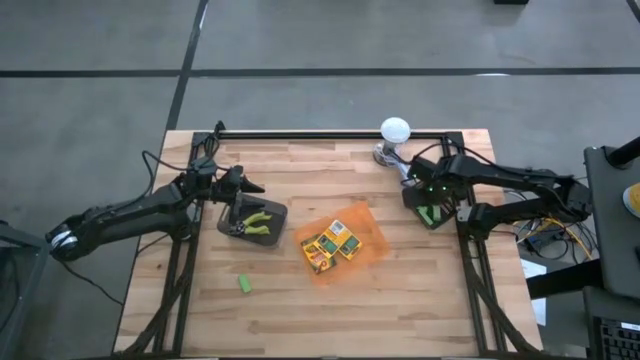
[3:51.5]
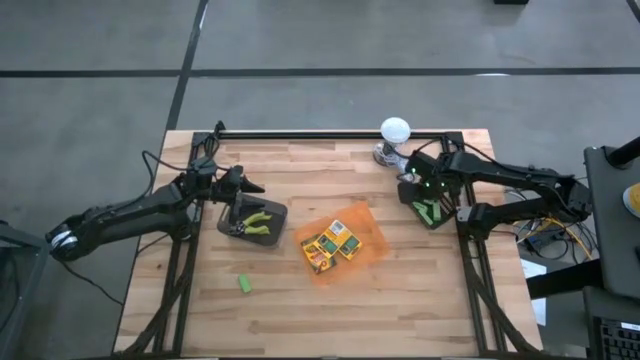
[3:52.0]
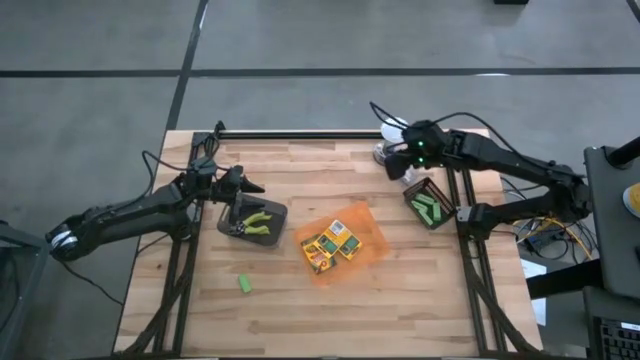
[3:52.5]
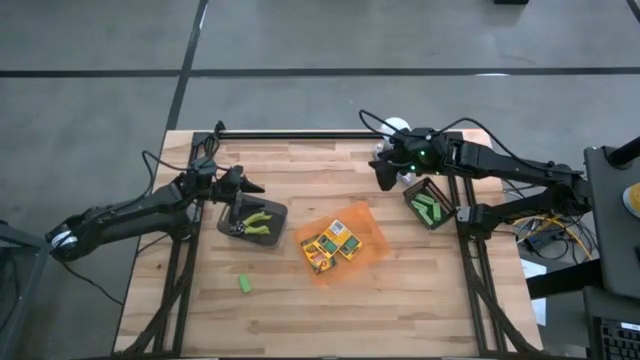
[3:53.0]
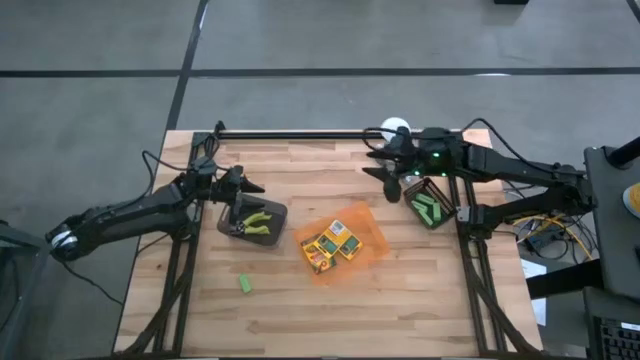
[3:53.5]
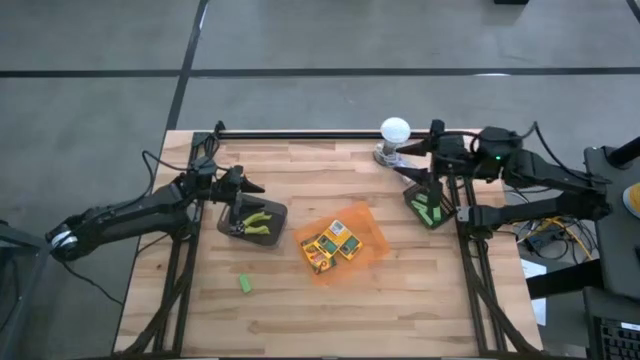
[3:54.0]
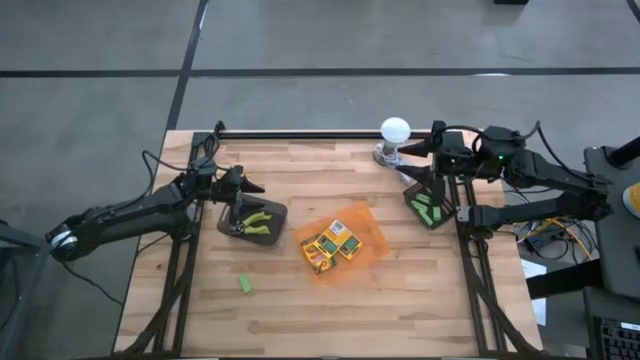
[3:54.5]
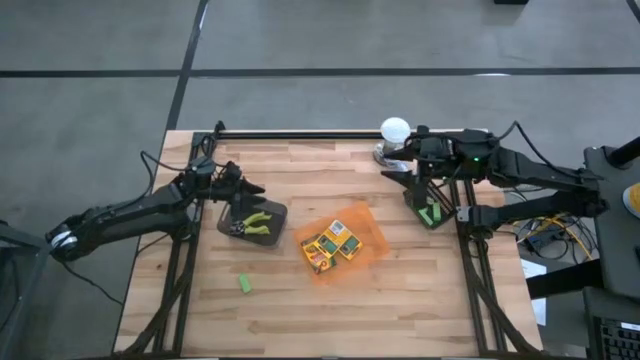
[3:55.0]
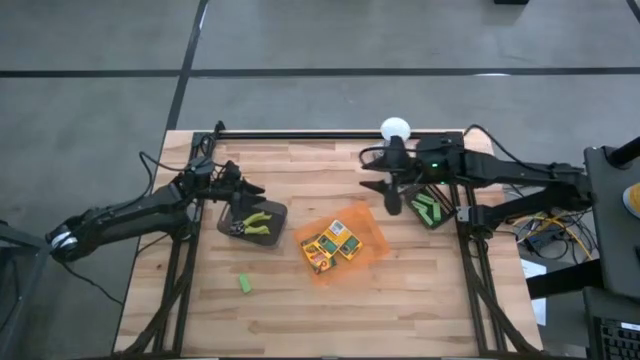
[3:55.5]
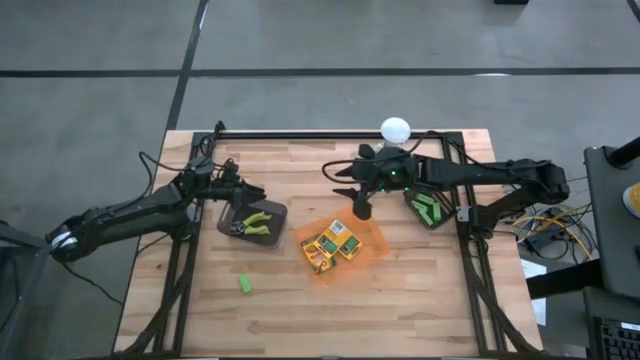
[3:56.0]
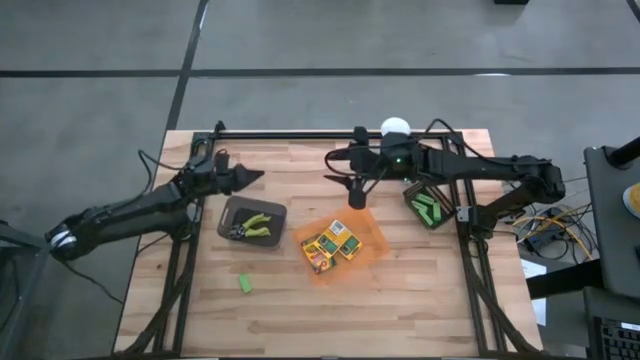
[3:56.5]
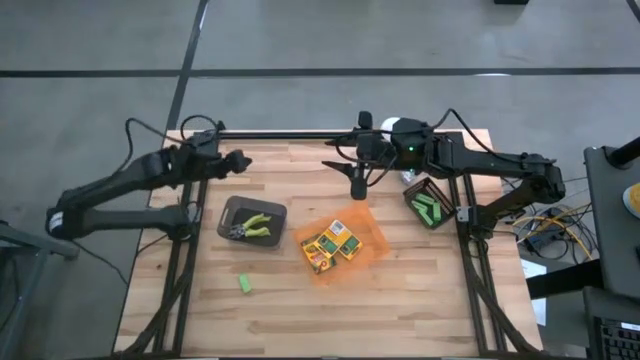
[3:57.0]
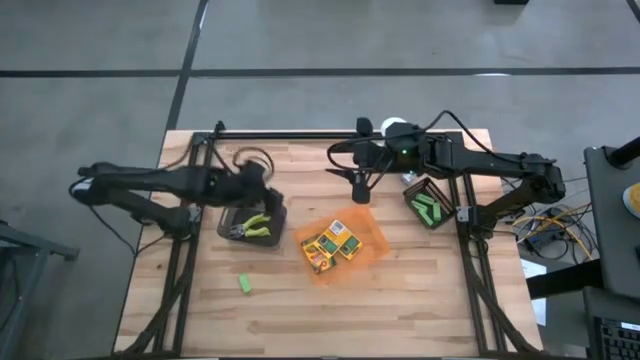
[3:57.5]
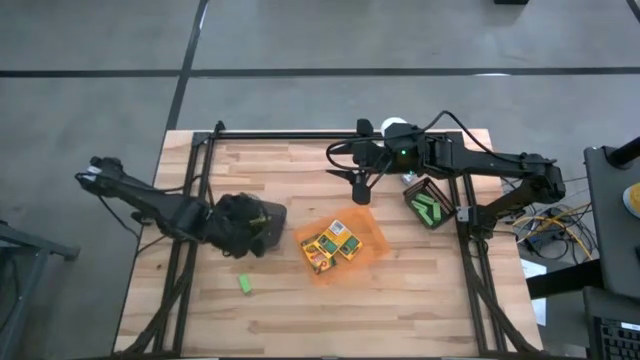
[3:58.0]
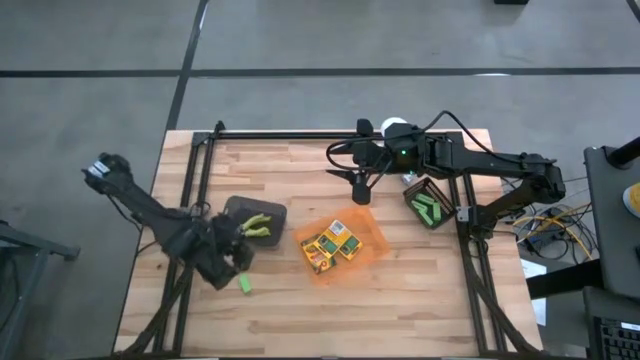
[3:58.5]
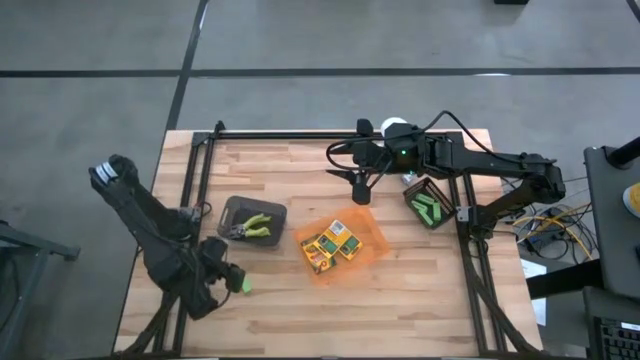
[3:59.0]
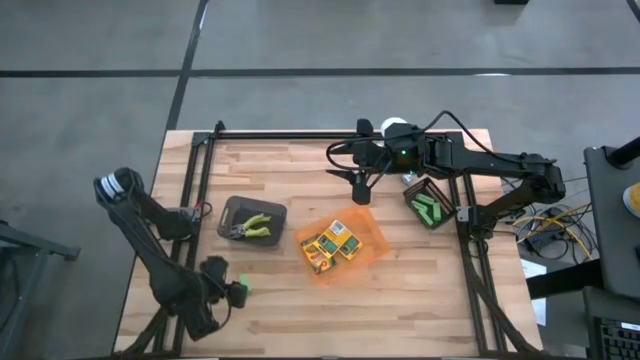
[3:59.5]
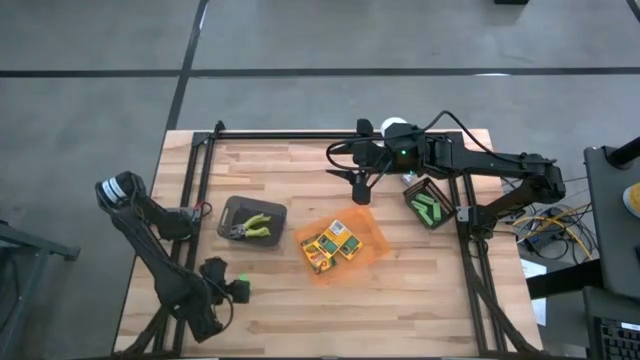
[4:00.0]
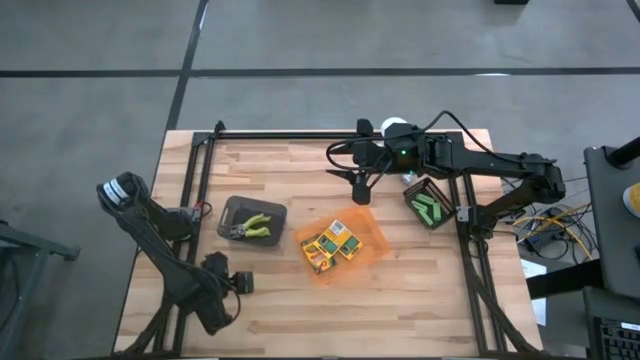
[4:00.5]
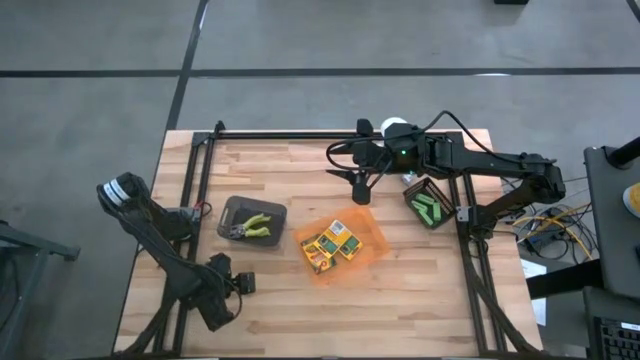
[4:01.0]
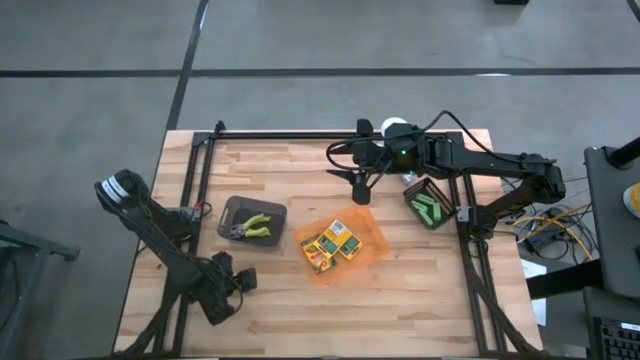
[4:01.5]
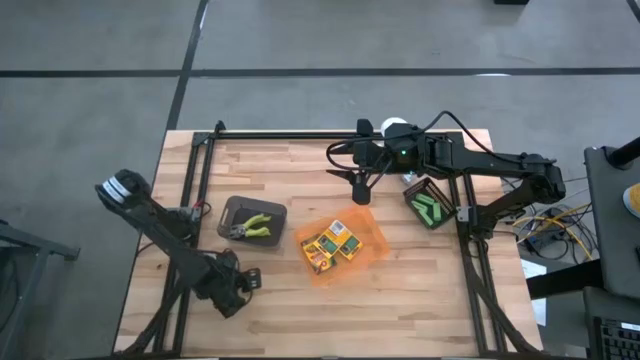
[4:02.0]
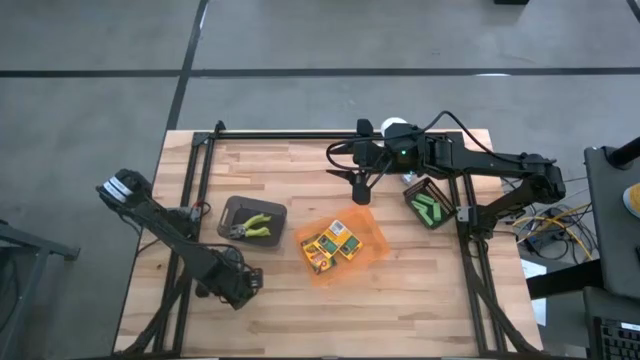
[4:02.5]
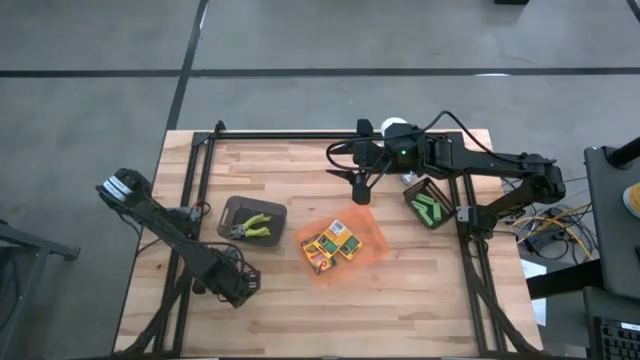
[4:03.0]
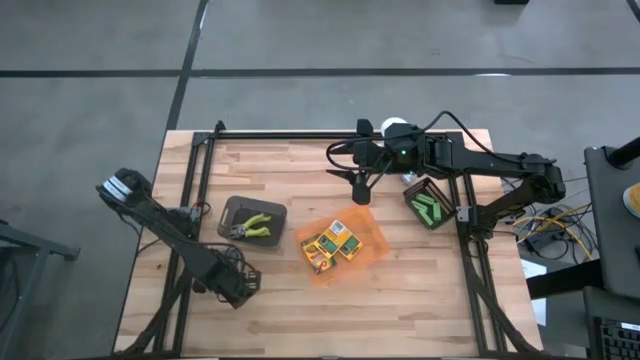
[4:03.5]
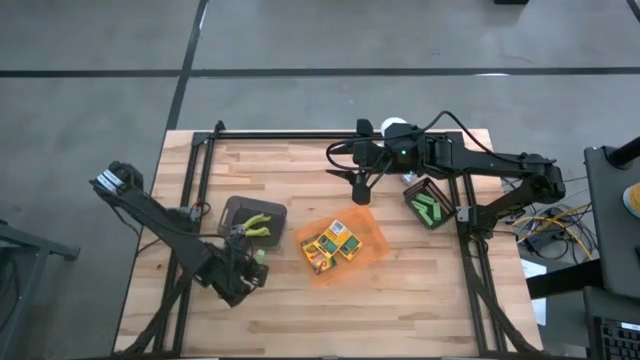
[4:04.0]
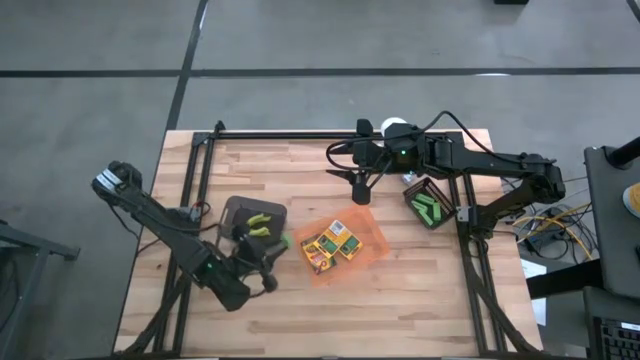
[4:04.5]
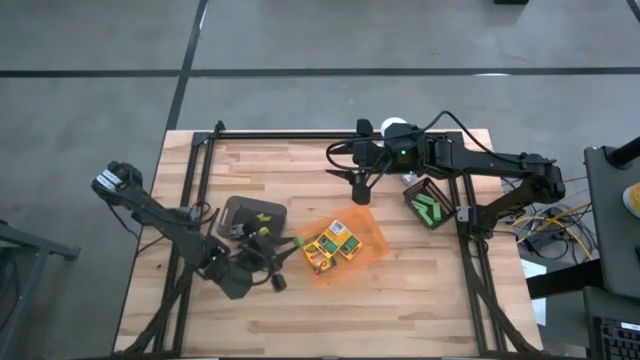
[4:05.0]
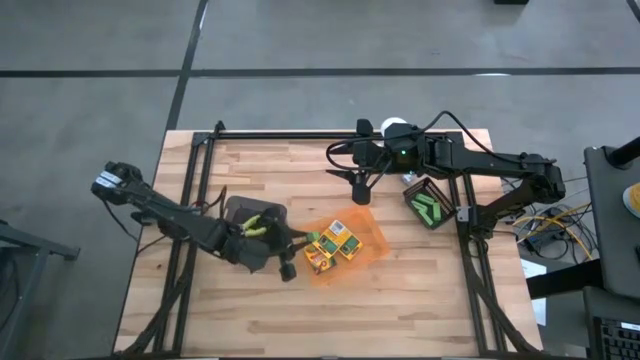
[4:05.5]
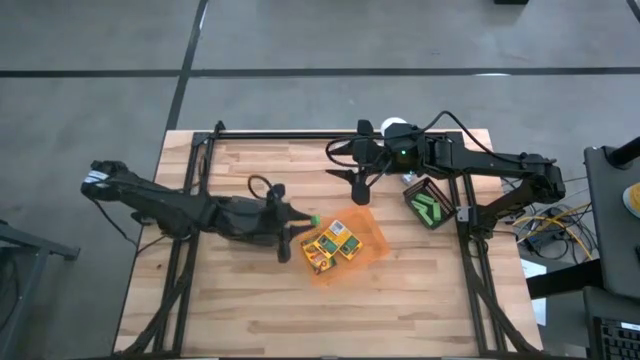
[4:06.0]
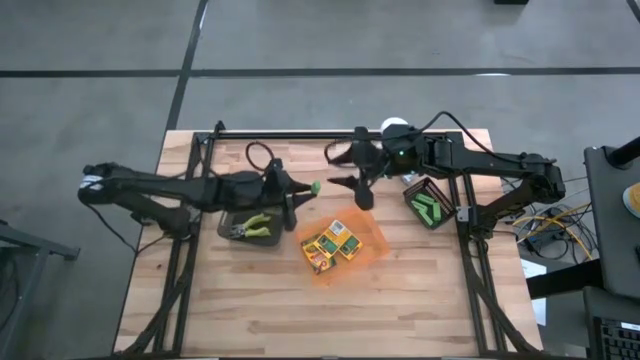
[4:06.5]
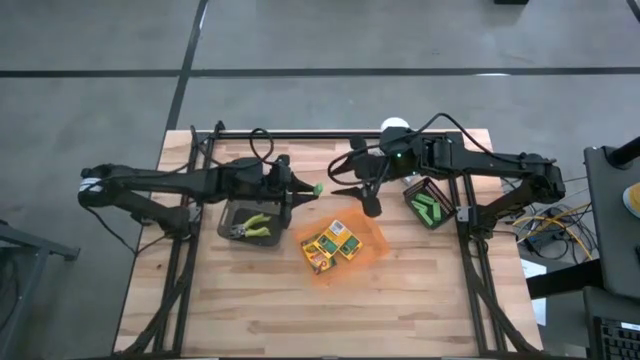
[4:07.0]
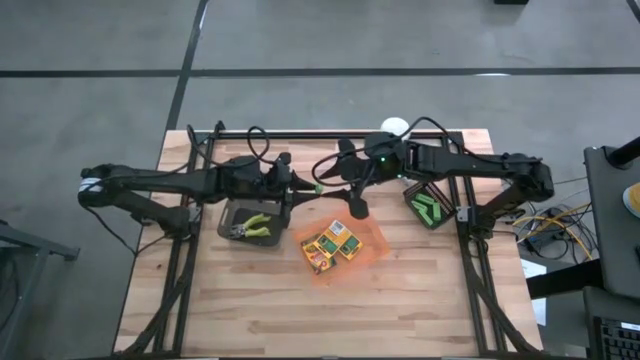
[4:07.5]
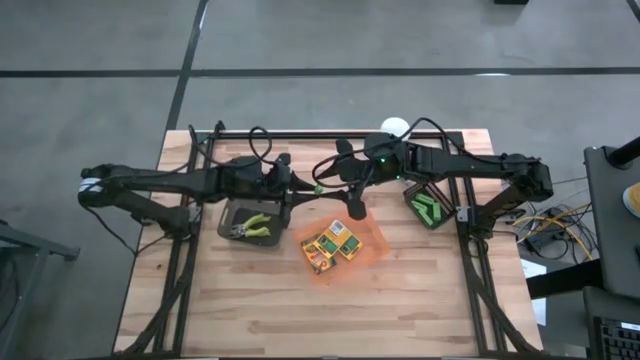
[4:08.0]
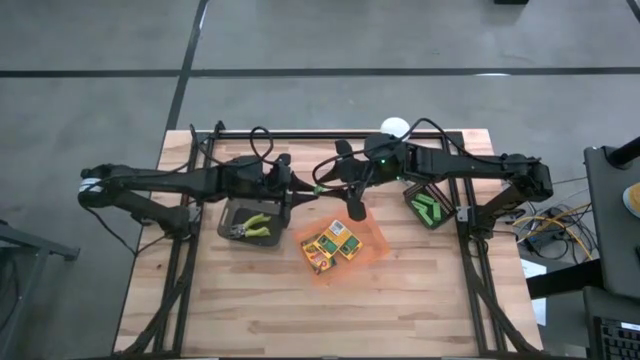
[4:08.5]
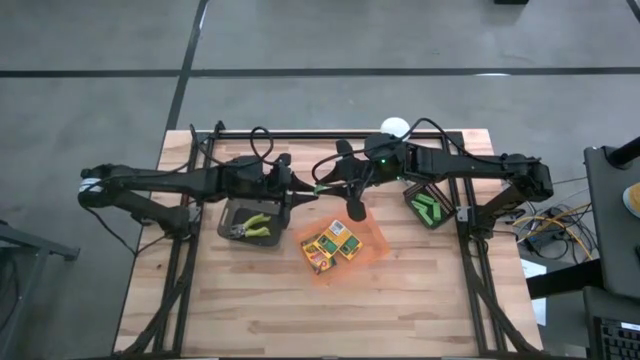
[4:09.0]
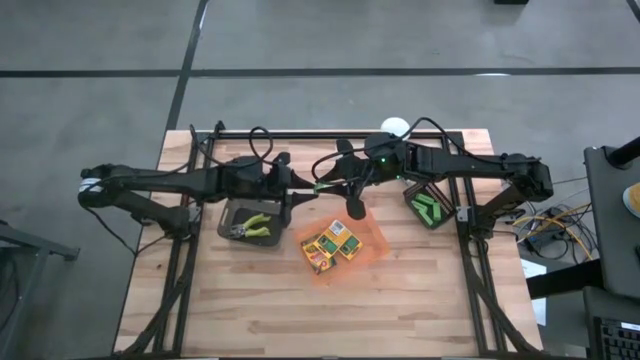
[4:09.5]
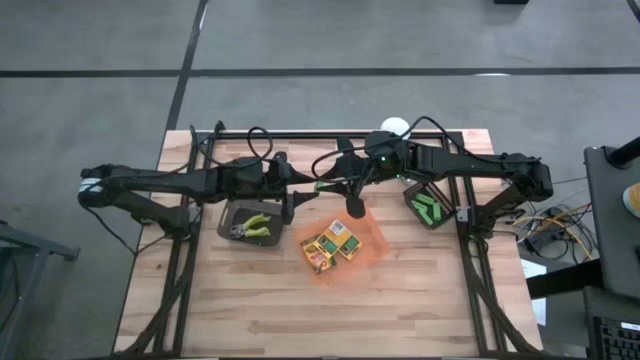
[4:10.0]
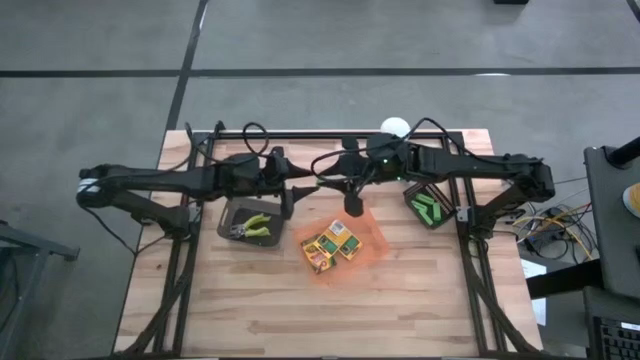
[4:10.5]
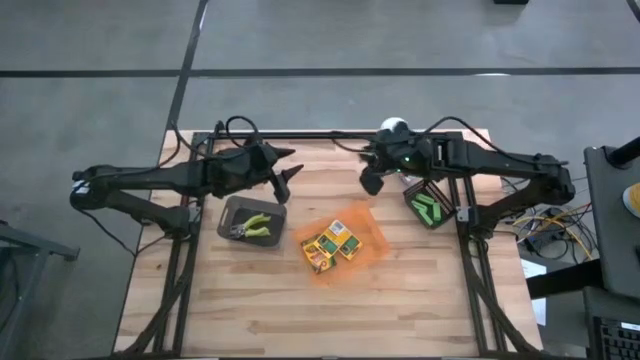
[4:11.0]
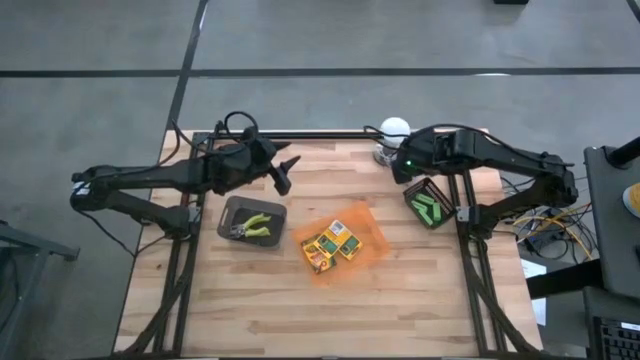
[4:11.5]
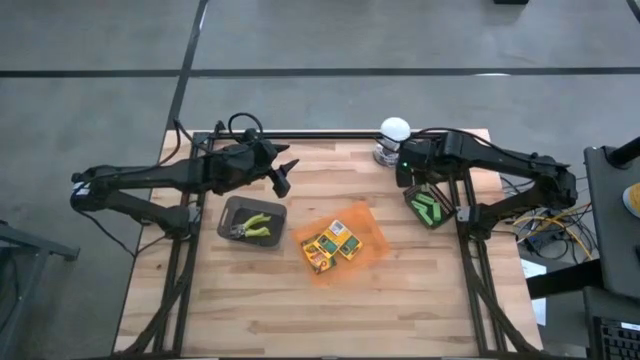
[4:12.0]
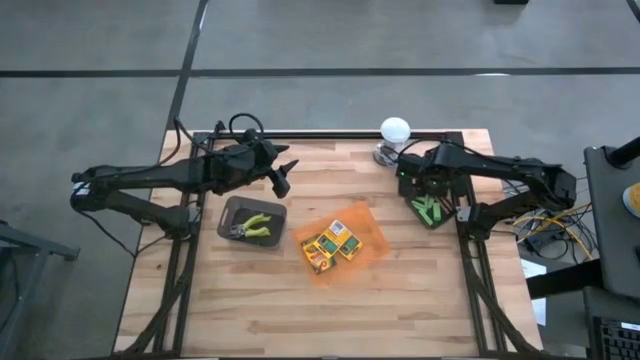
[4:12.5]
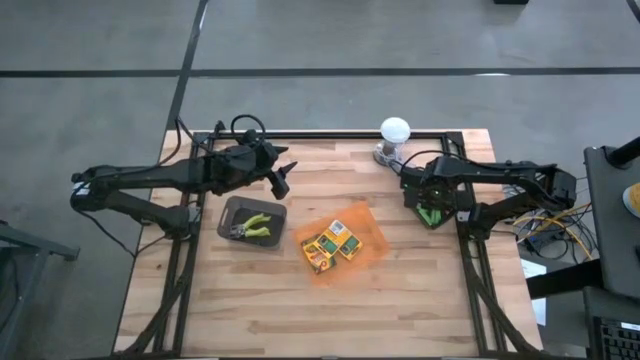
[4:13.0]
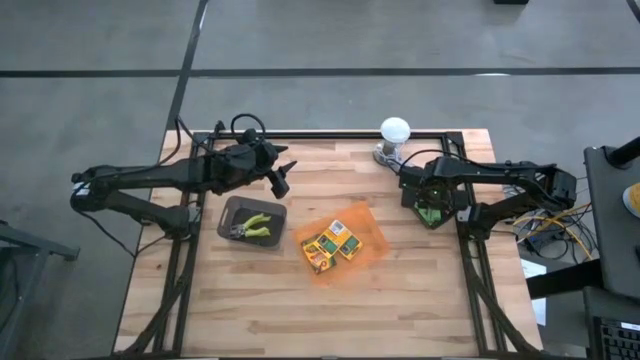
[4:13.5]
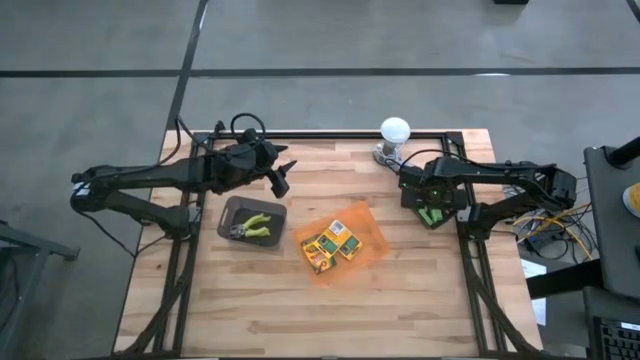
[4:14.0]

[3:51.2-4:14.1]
Task: Pick & Place School Supplies
Put the green eraser into the black basket
